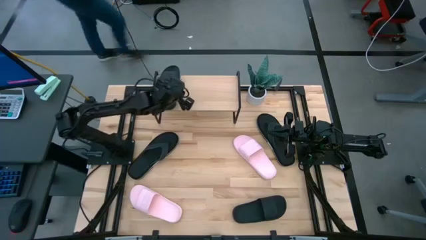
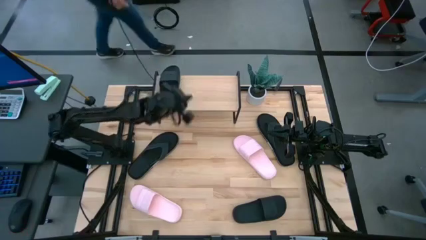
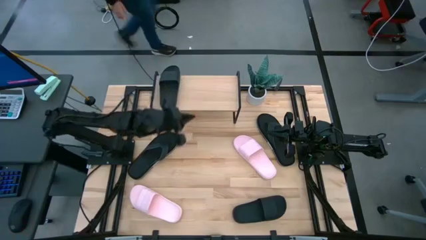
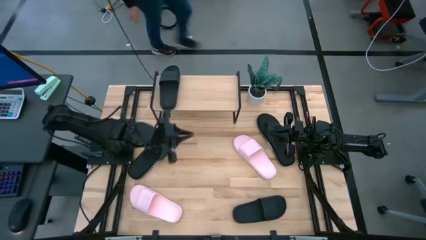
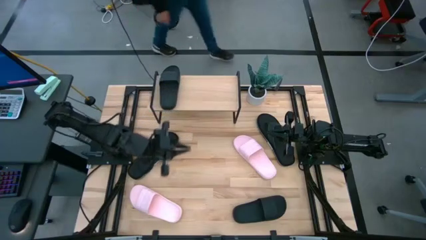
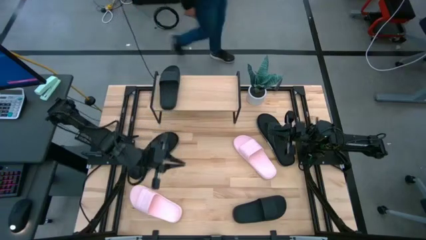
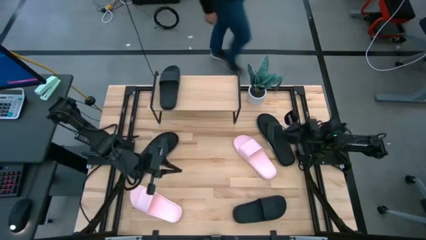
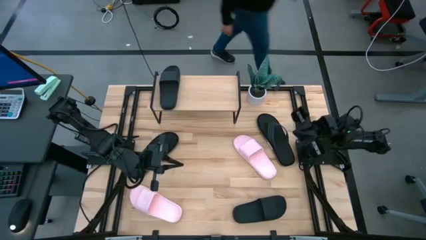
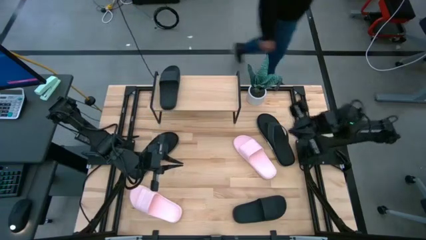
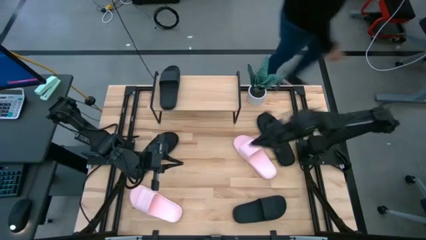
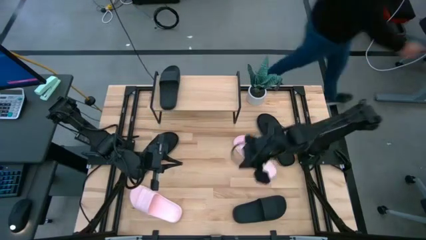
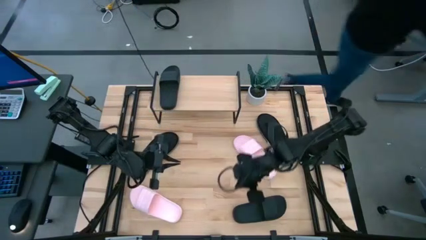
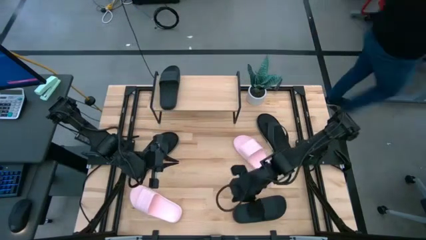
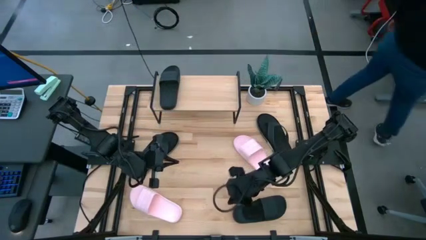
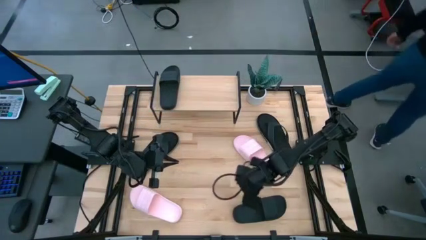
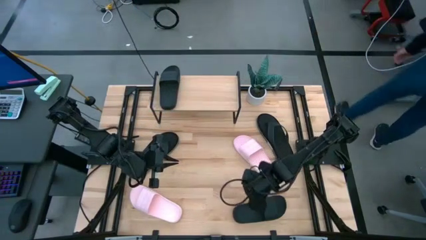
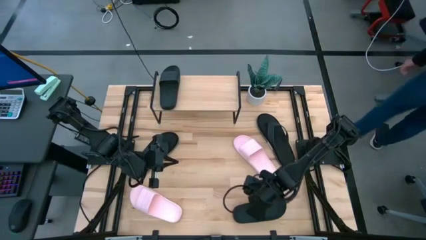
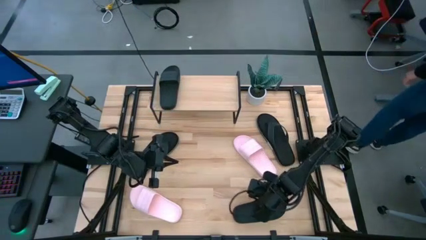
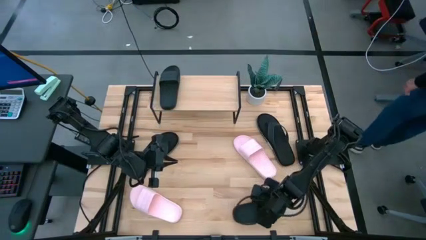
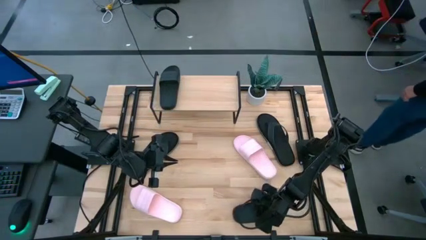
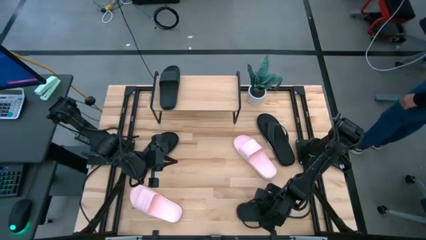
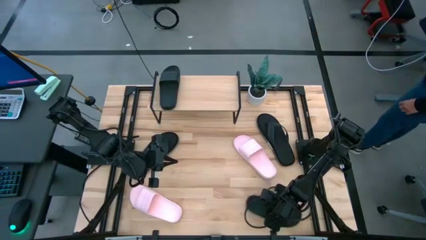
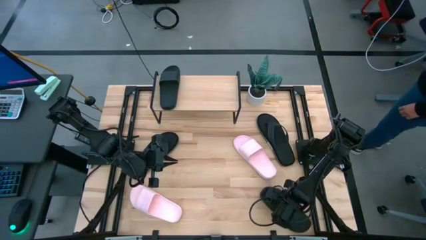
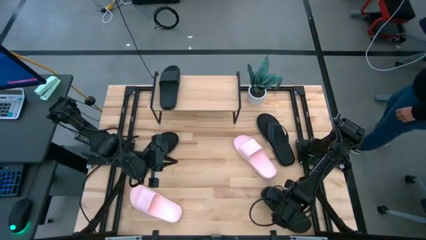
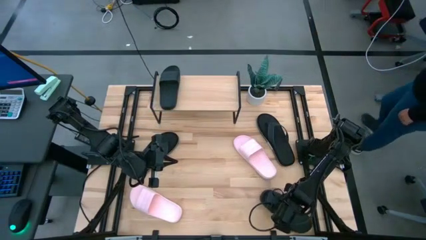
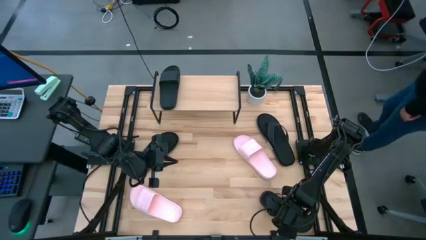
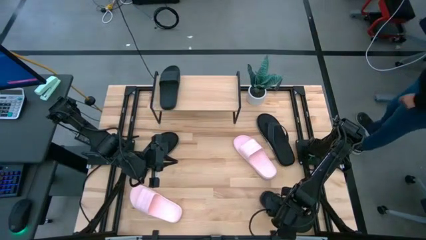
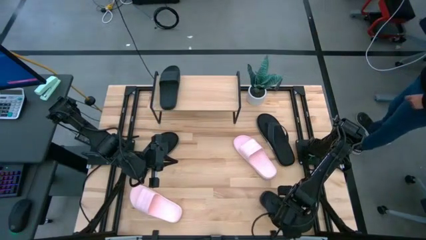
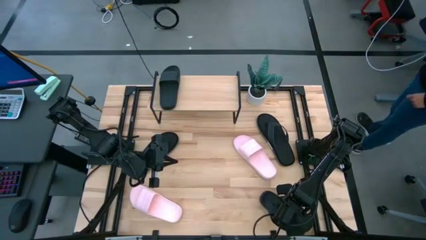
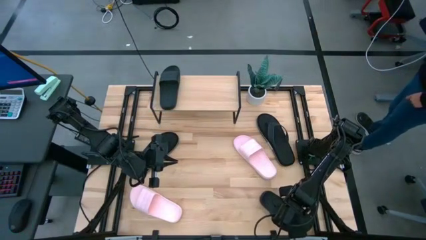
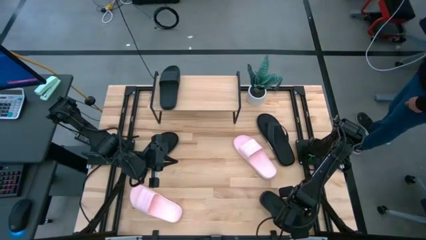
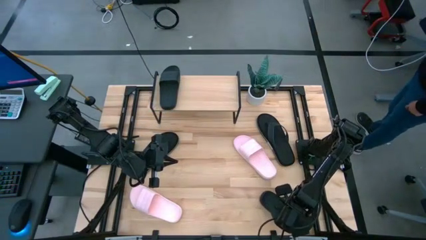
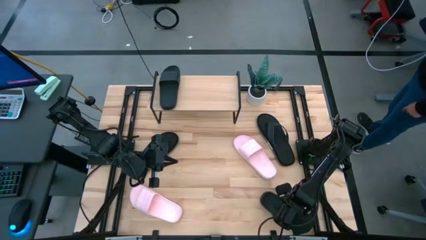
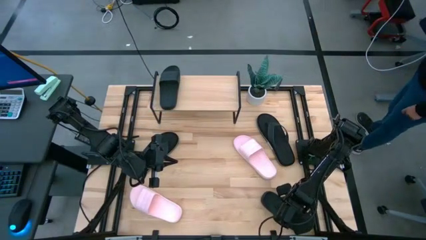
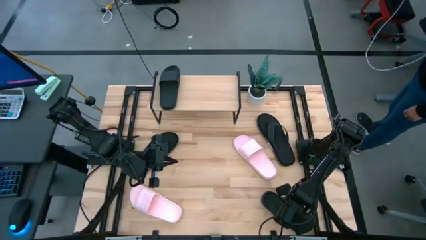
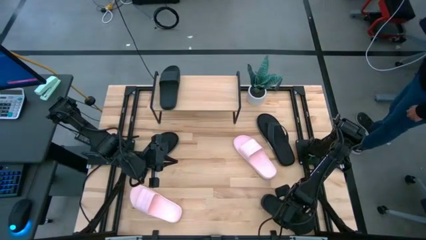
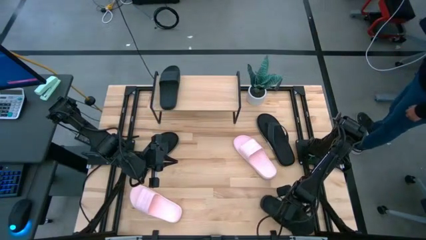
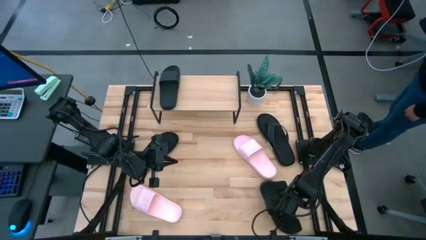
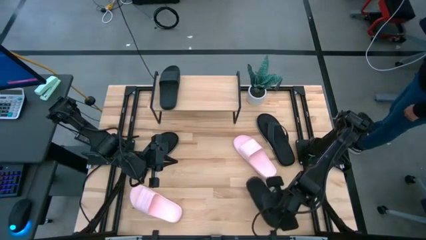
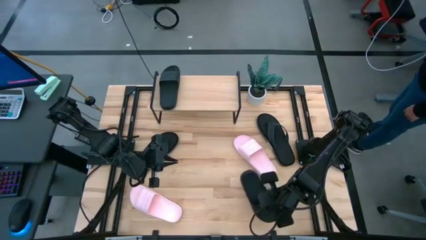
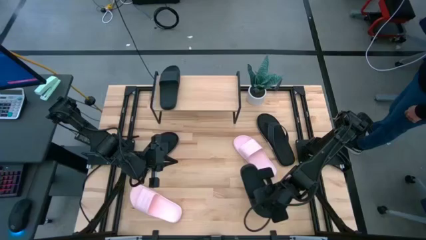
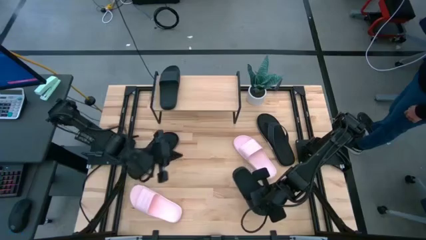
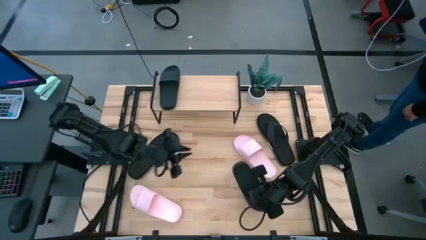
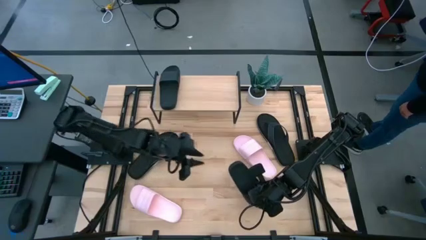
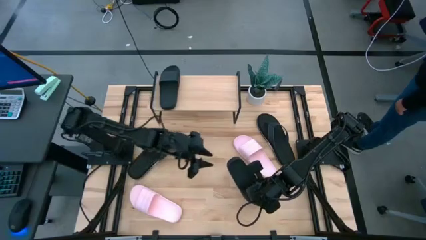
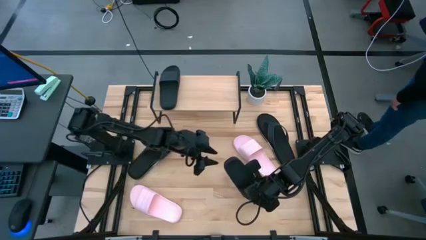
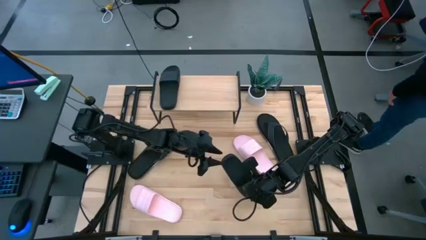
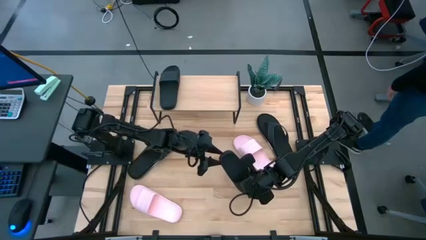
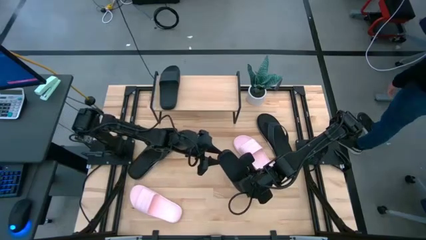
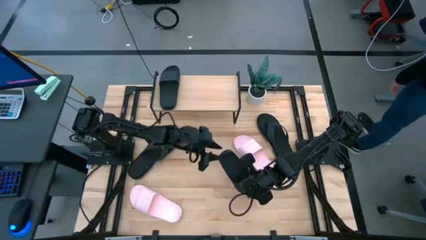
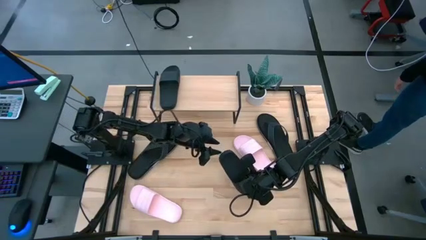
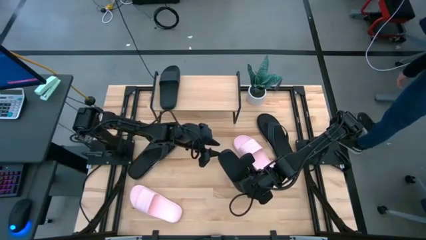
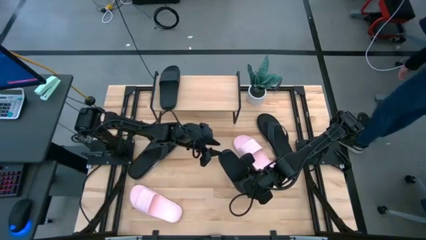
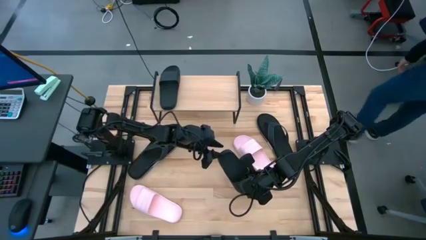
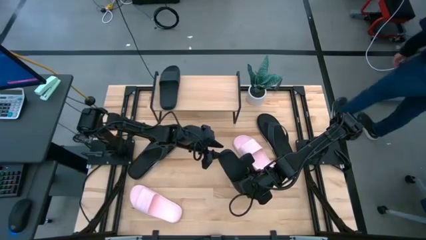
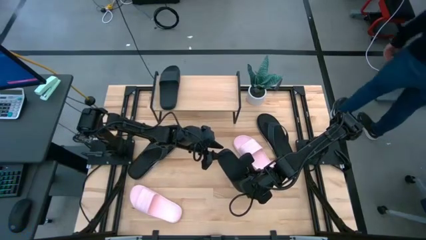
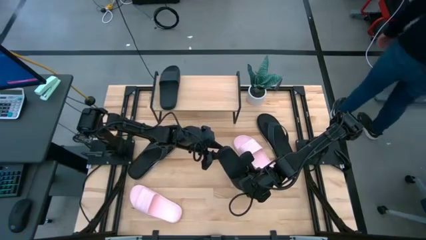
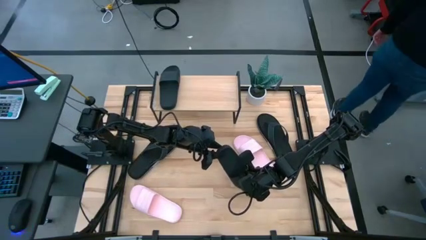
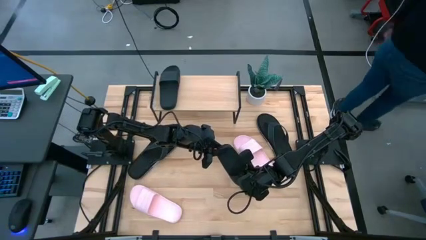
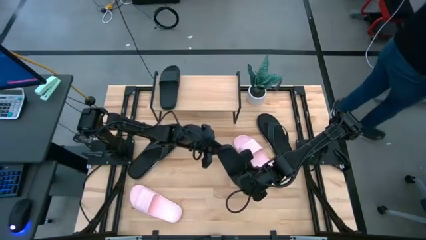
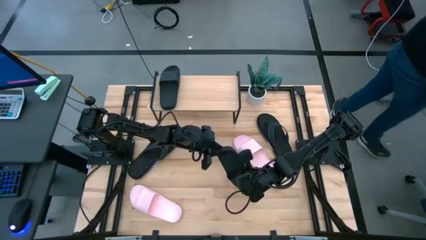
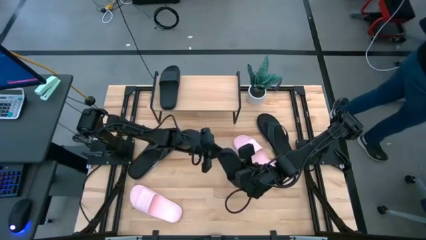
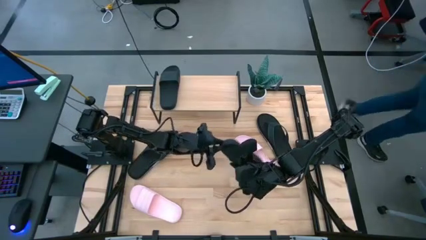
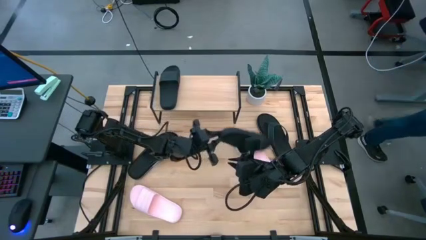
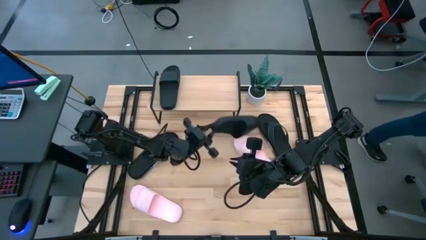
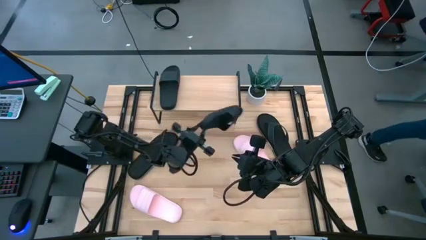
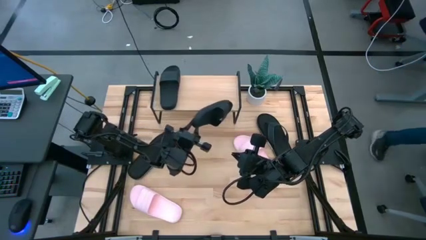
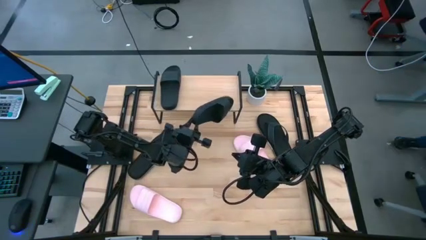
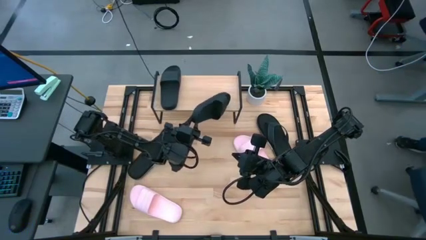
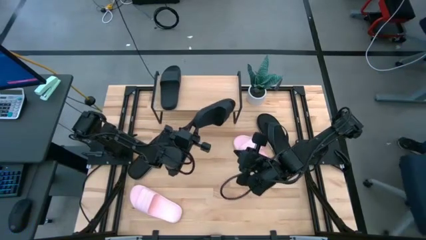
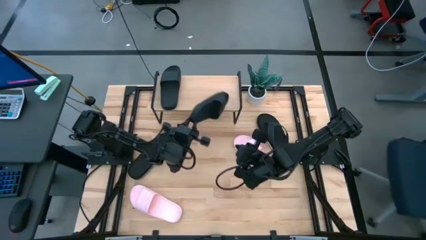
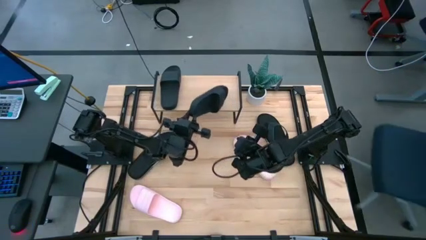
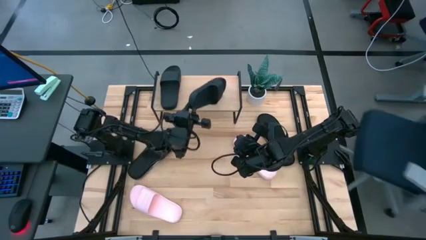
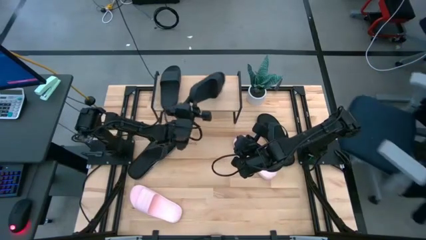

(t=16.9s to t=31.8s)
Task: Pick and place slides into the shelf
Put the black slipper on the shelf
